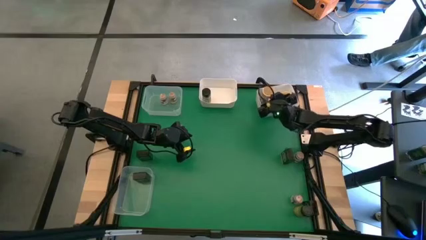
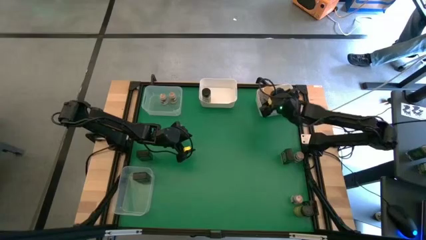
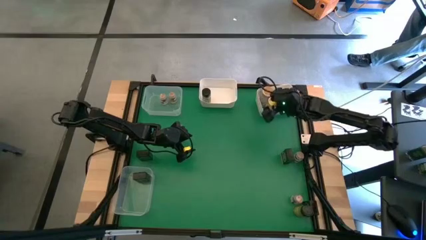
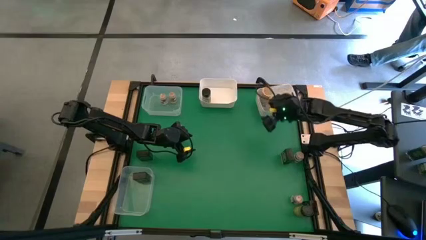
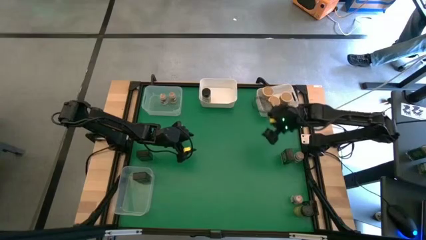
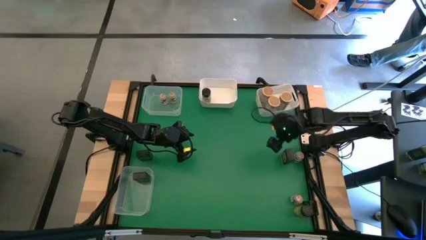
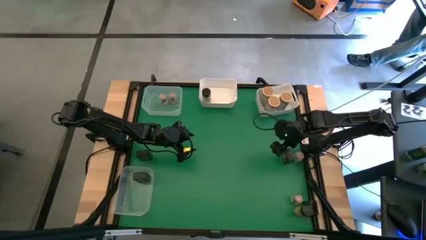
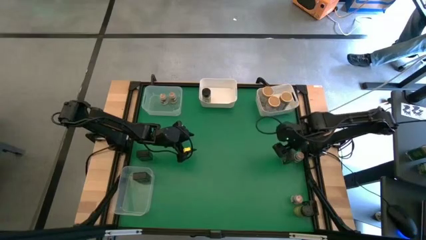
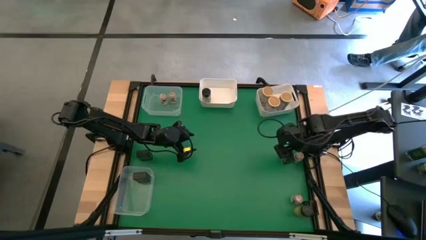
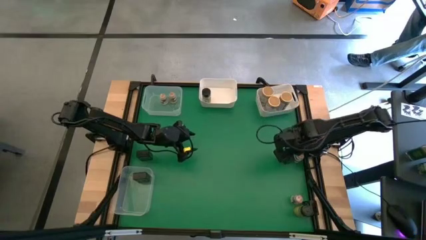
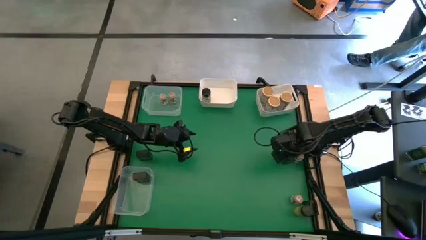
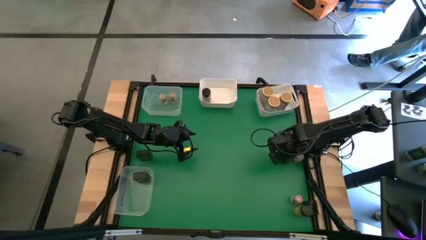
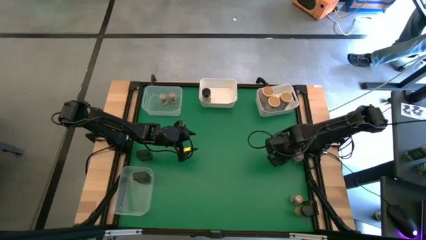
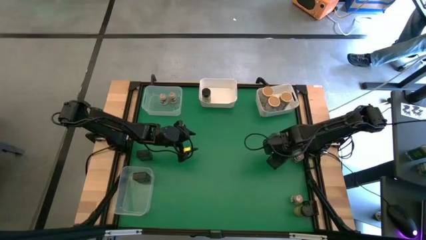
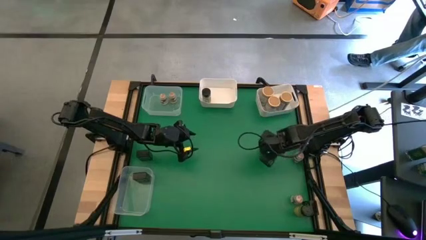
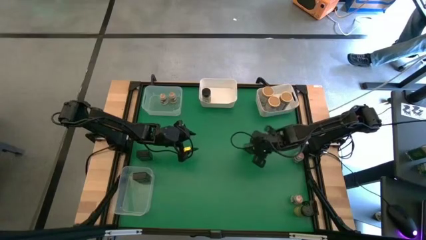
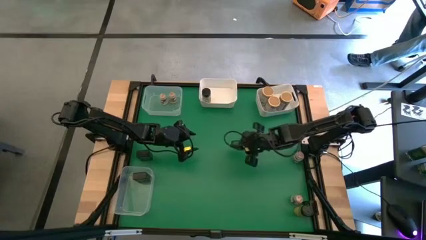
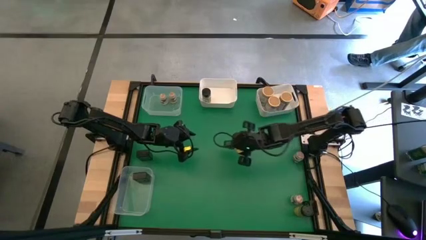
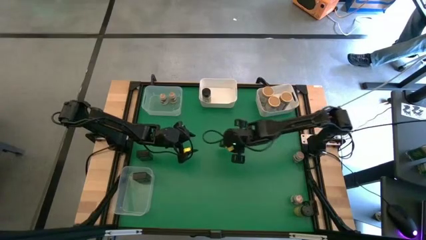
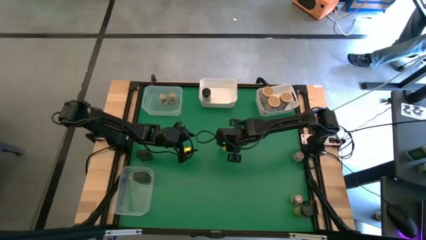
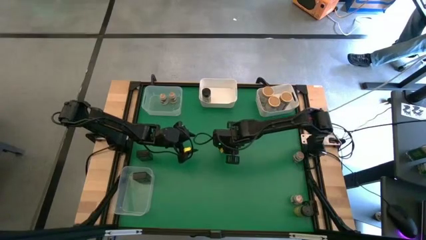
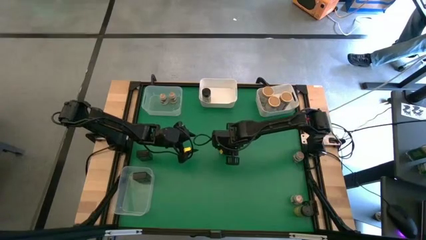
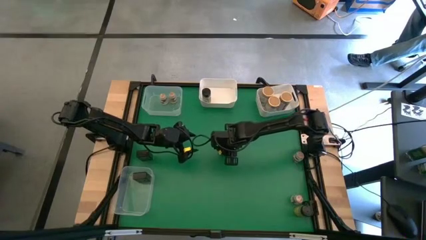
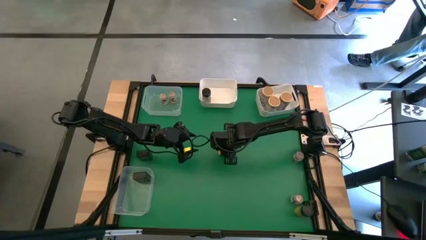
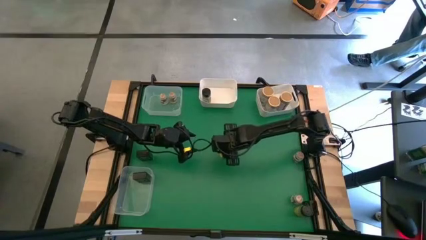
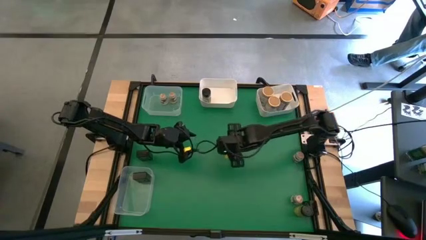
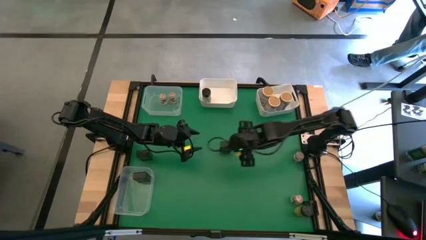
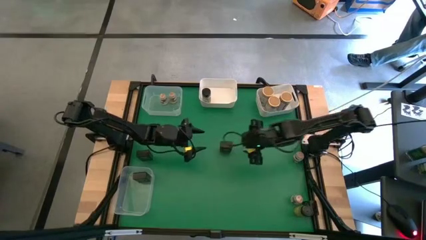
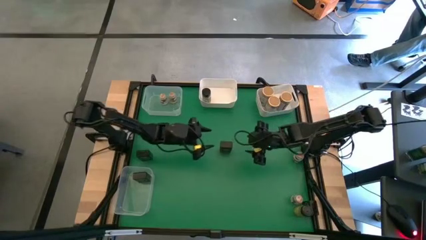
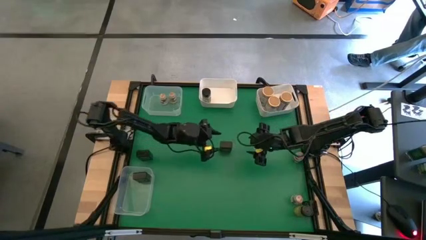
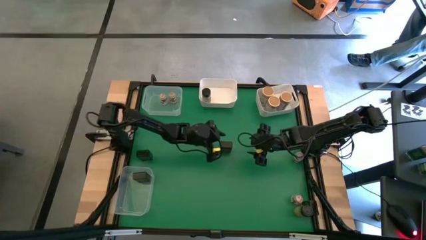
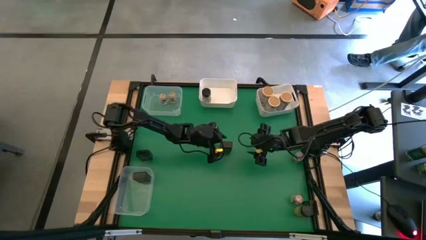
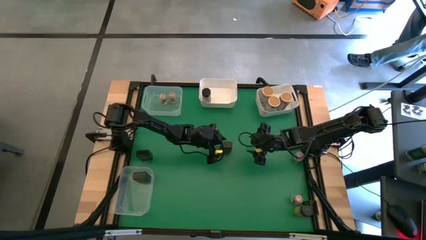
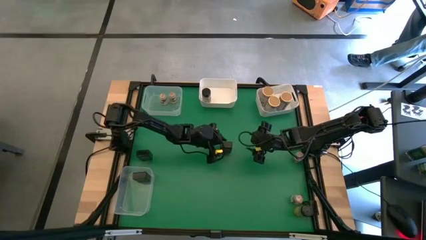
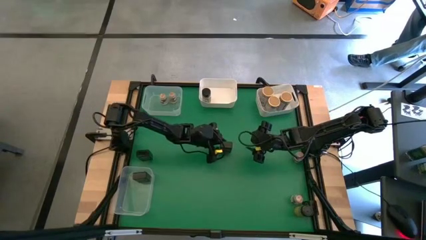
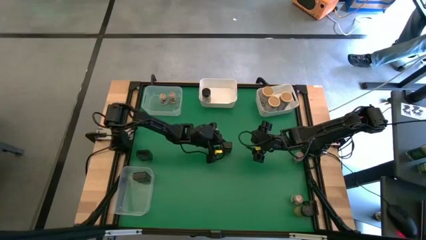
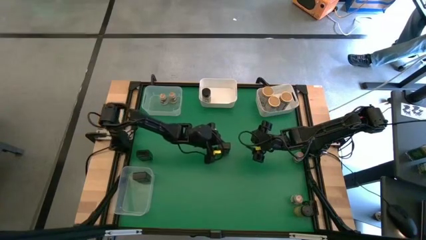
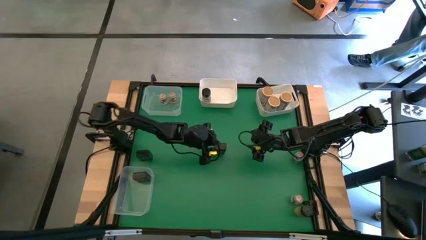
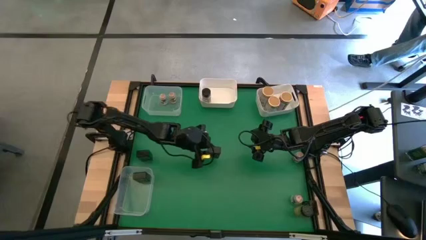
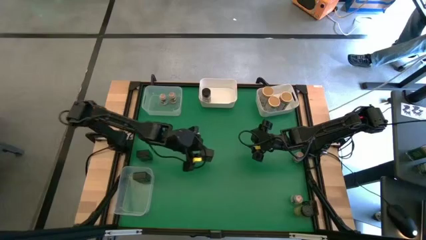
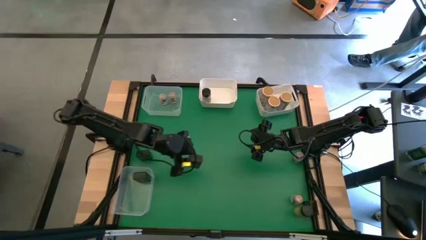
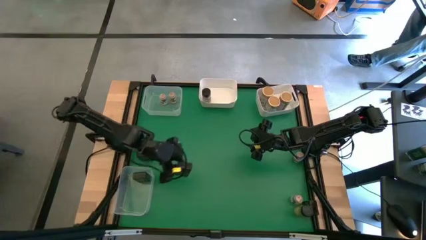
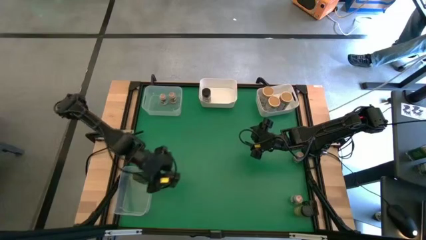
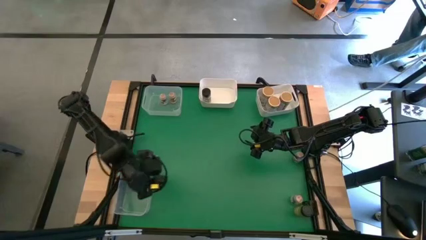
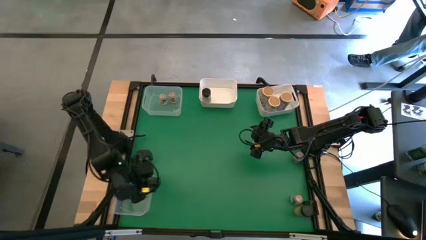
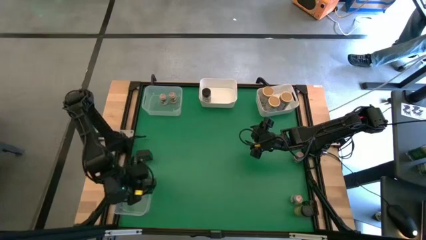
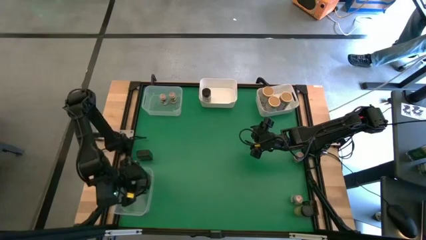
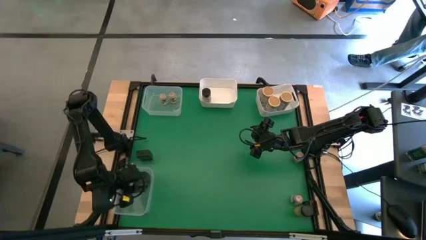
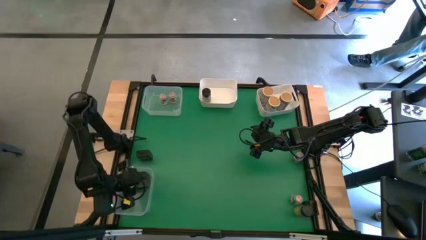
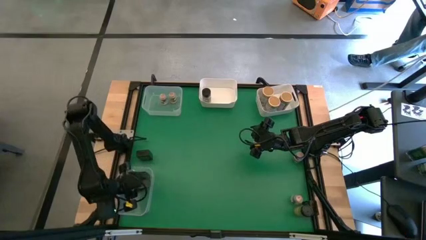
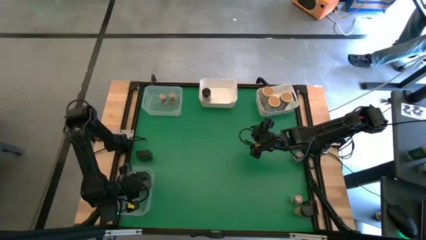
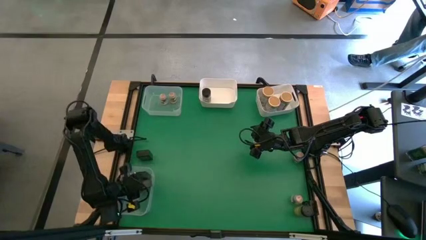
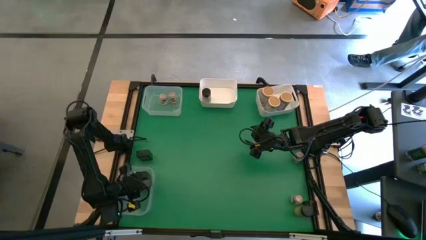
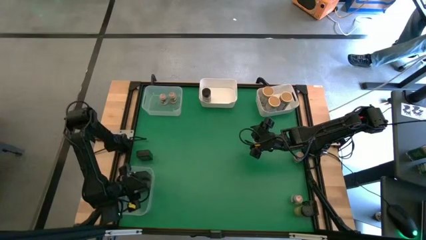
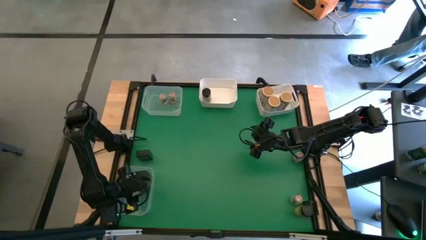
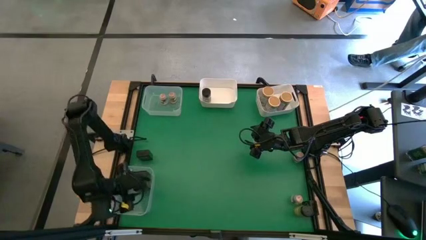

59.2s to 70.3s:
Task: Sort spices by type
Put the top right black seasoning can into the bottom transparent bin

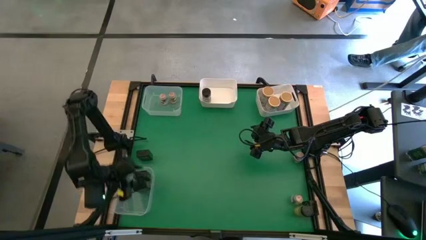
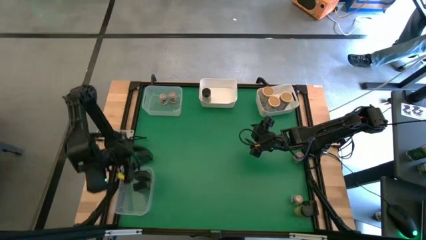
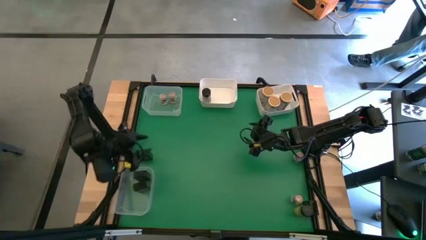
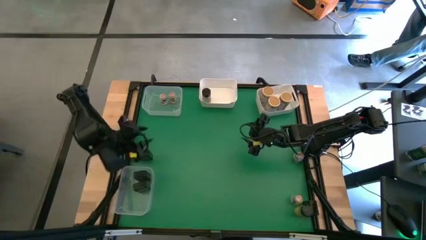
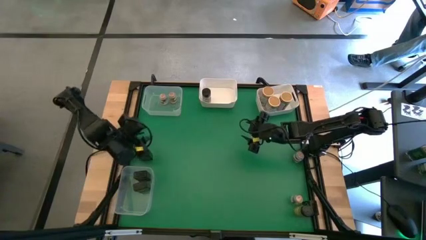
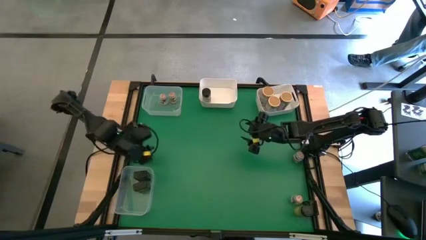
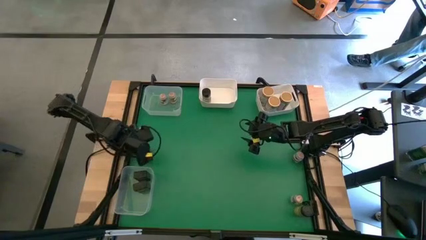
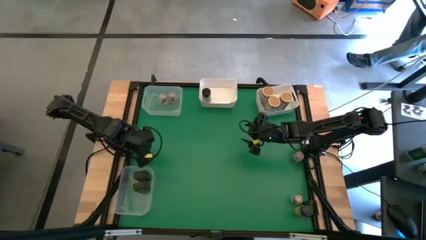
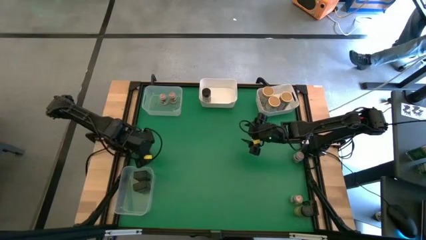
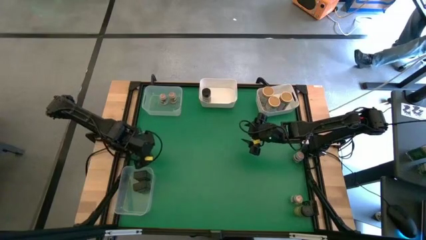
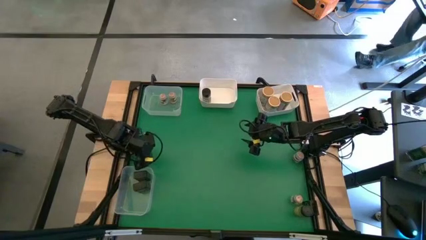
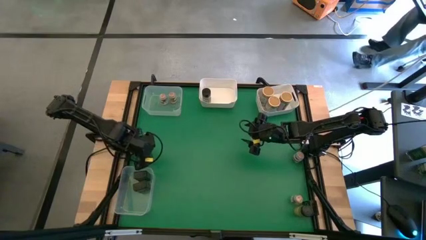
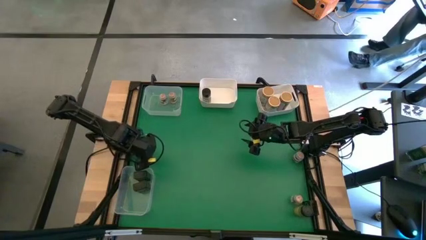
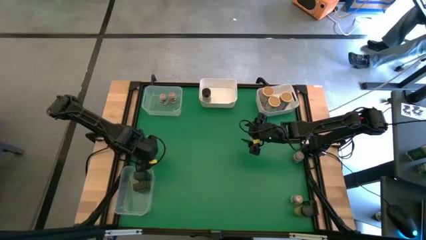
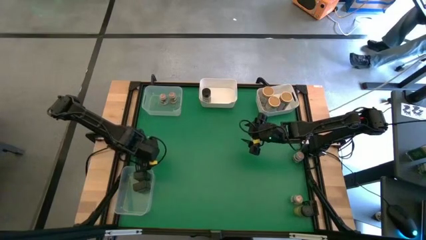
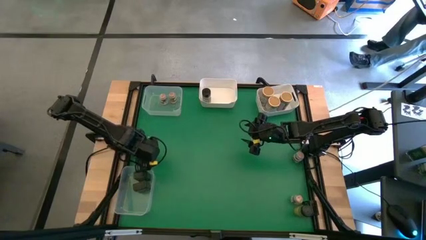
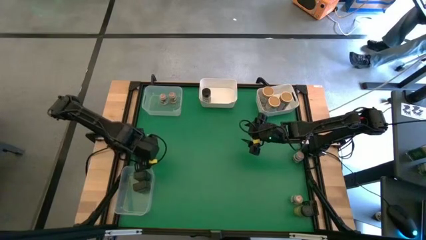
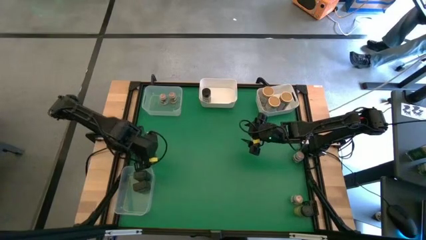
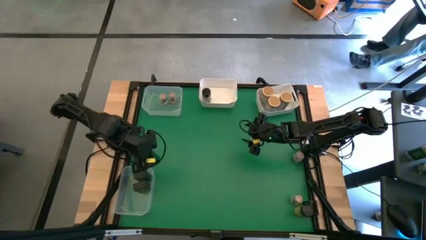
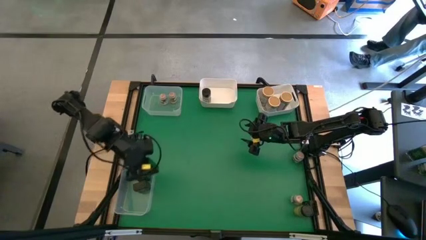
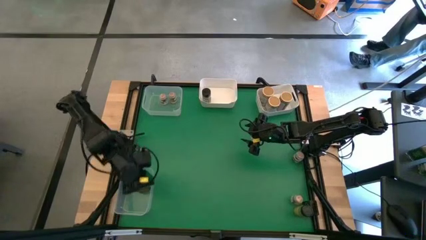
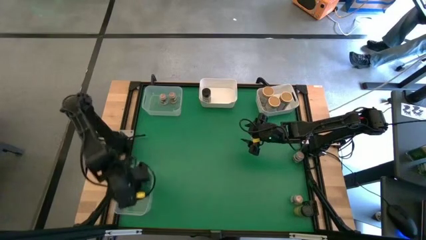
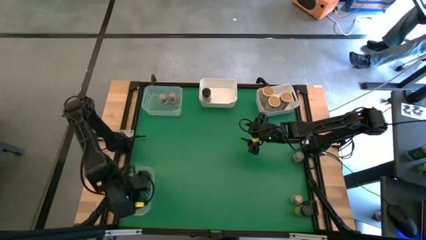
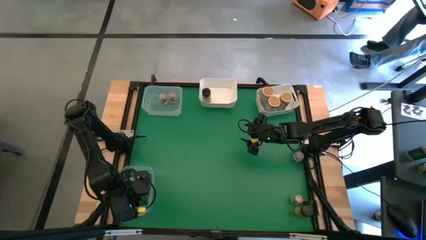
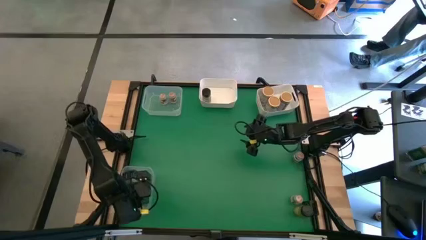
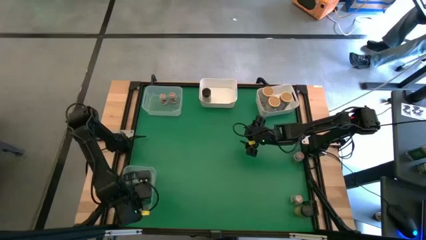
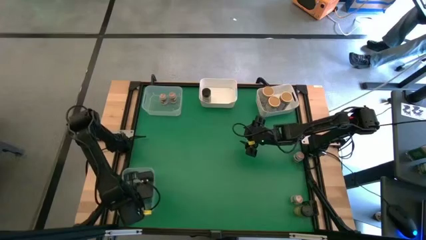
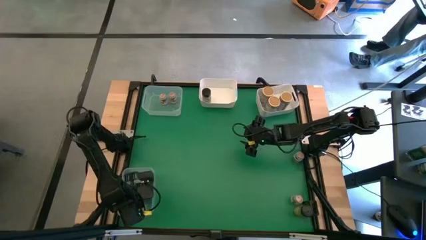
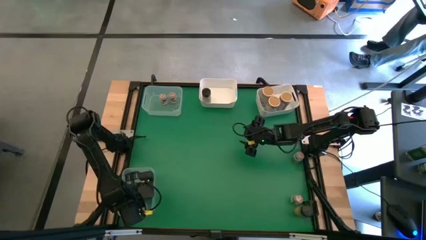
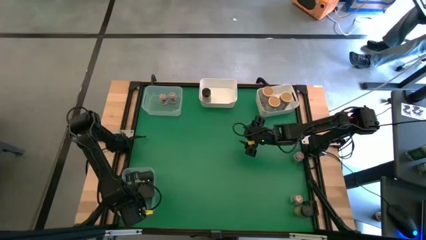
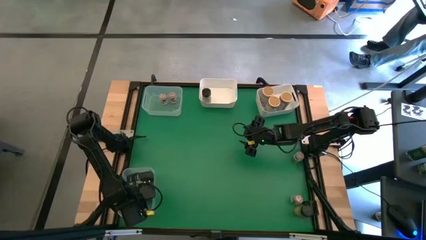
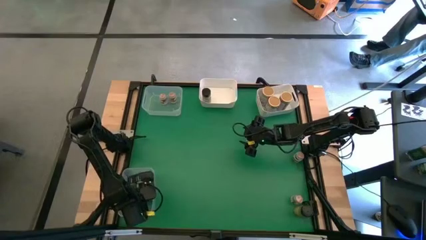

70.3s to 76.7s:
Put the top black seasoning can into the bottom transparent bin
